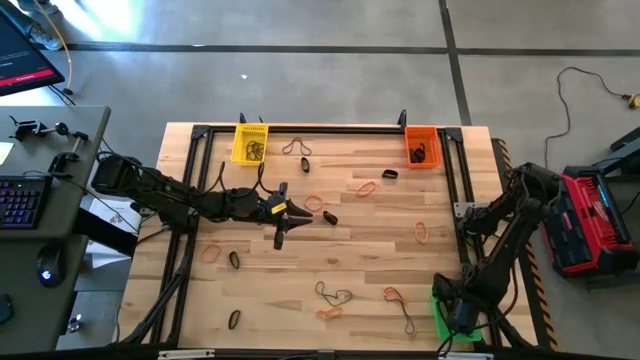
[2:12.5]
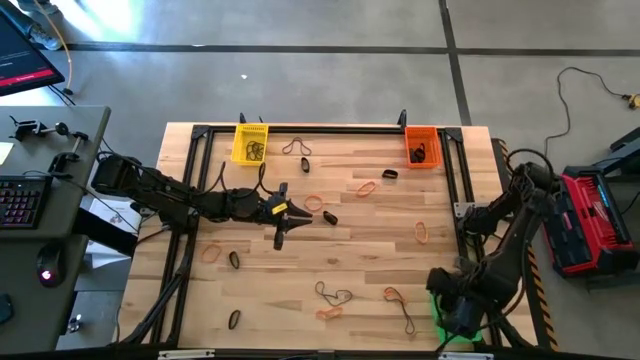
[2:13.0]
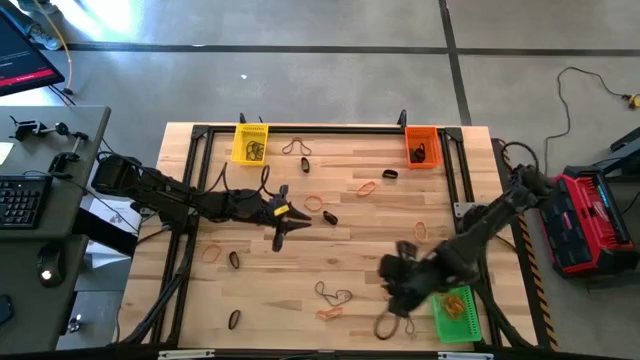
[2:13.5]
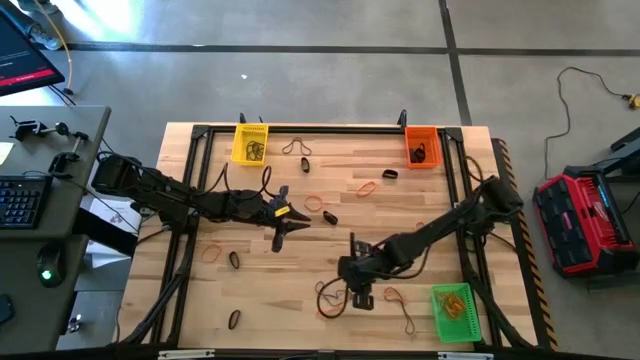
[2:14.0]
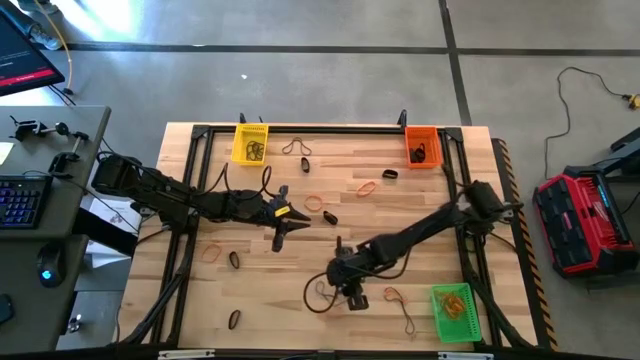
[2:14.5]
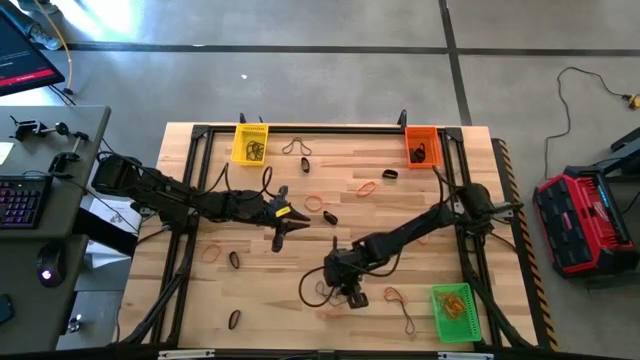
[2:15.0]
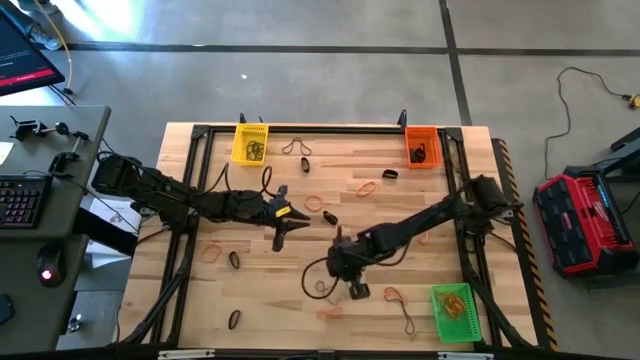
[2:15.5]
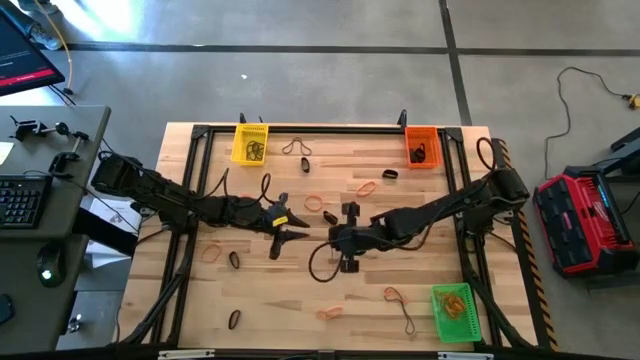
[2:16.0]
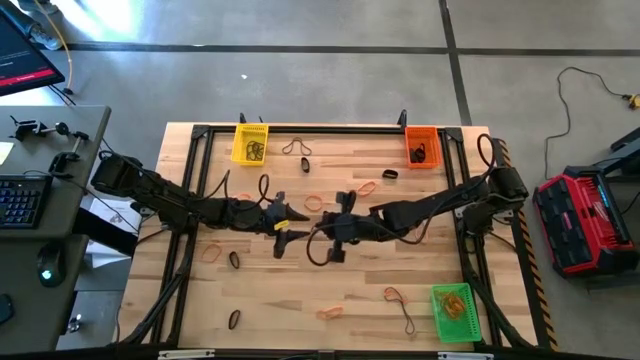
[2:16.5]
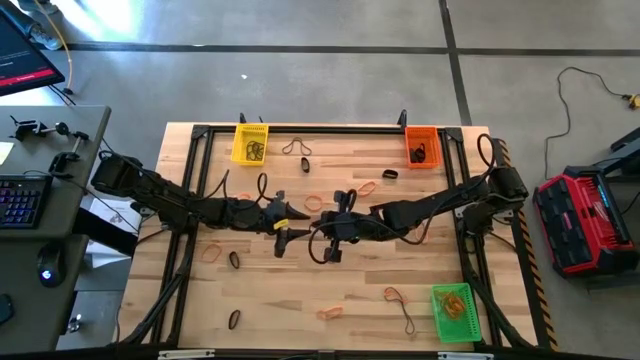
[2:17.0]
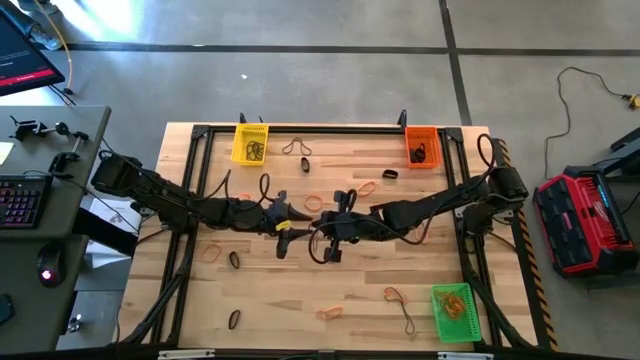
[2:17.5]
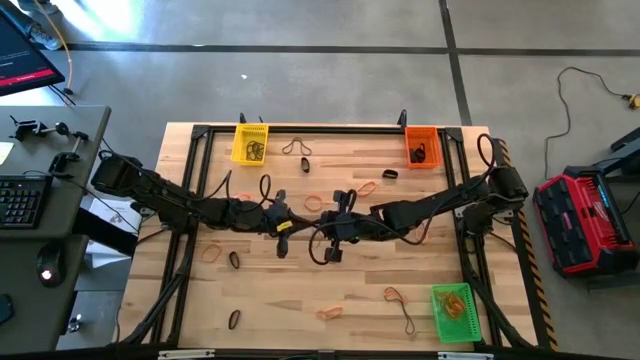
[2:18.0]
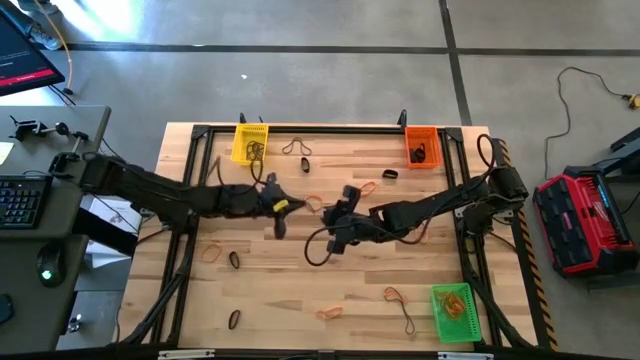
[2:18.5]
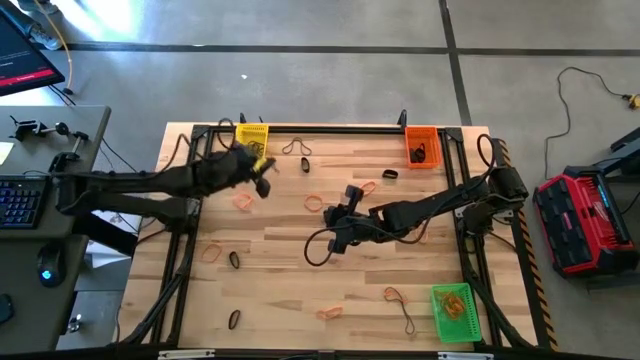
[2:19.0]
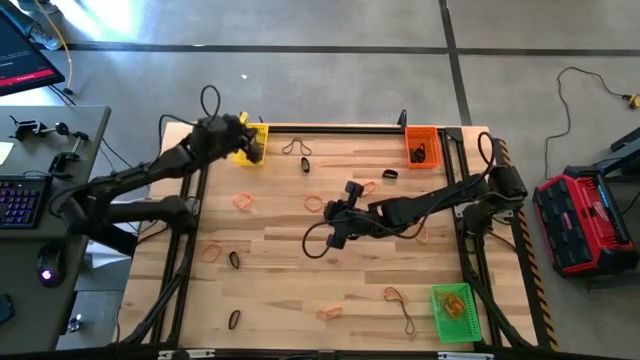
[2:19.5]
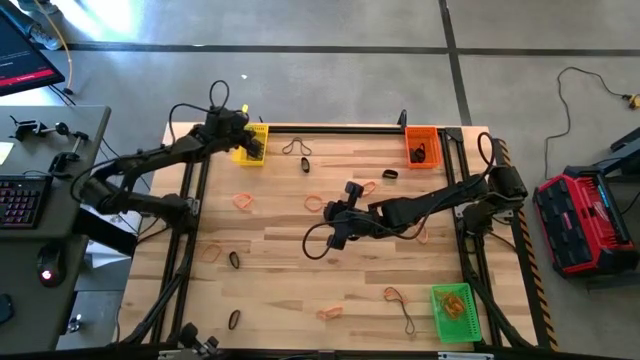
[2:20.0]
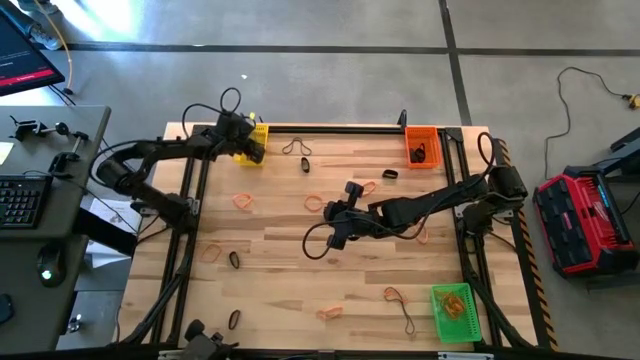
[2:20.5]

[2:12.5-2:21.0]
Task: Sort rubber bands into baskets
Put the purple rubber band into the yellow bin

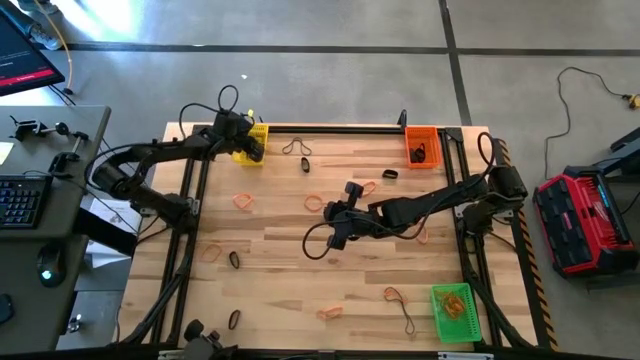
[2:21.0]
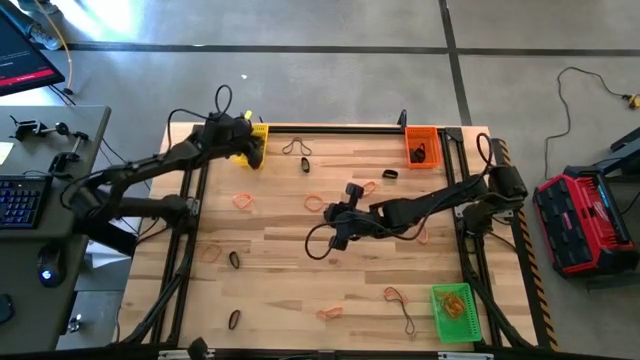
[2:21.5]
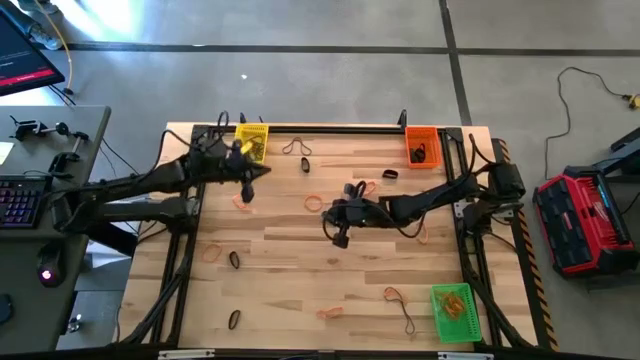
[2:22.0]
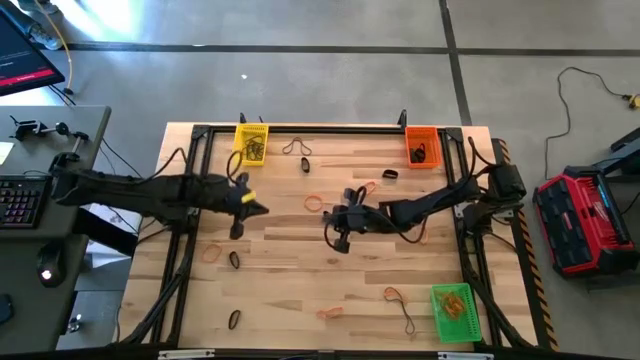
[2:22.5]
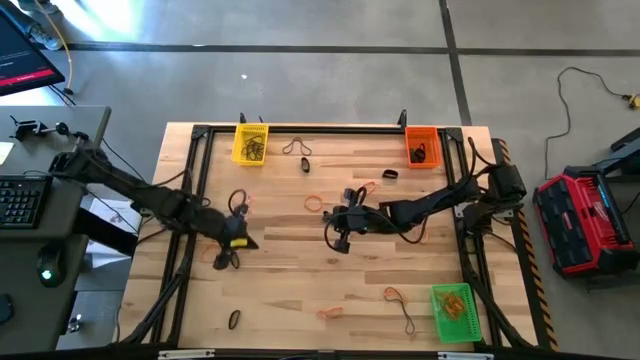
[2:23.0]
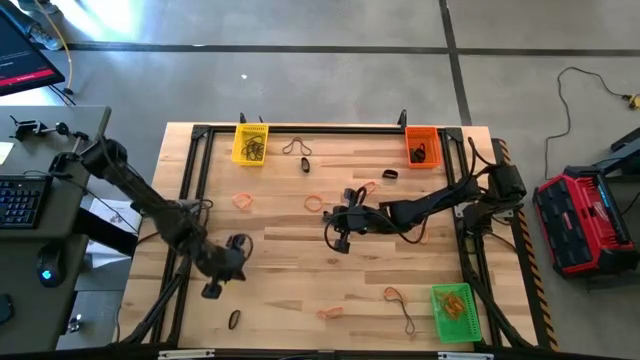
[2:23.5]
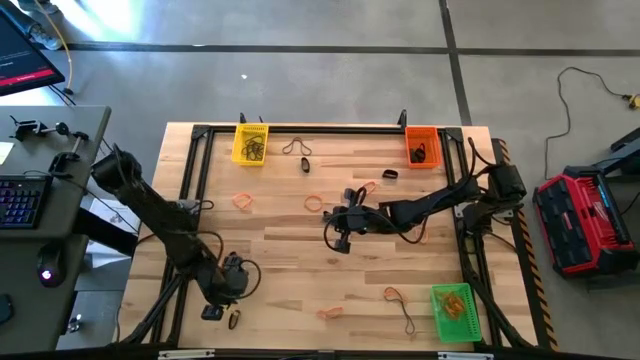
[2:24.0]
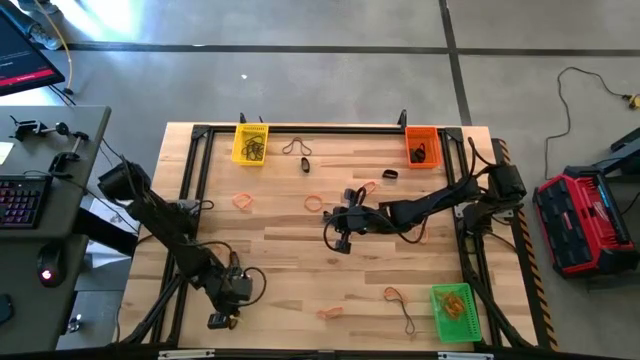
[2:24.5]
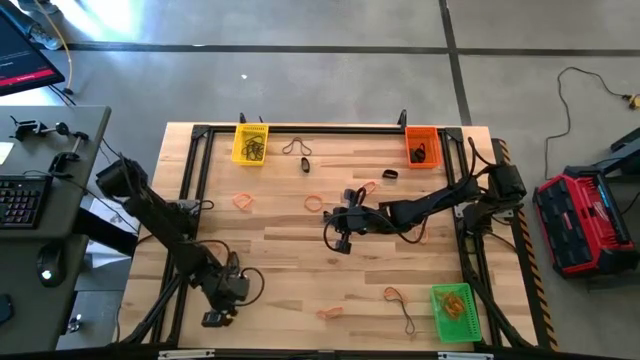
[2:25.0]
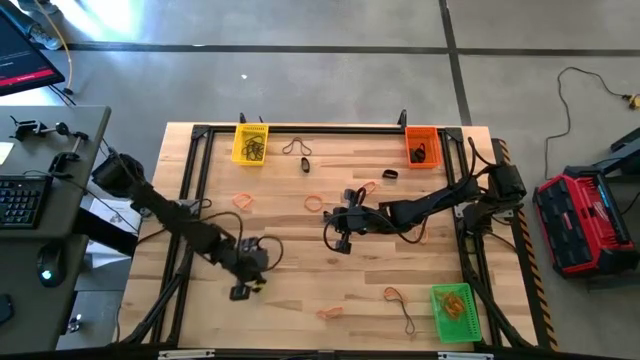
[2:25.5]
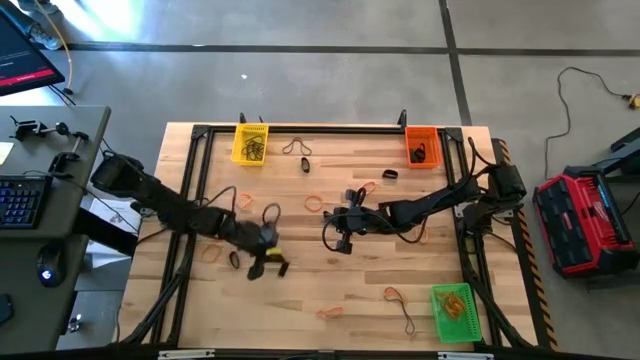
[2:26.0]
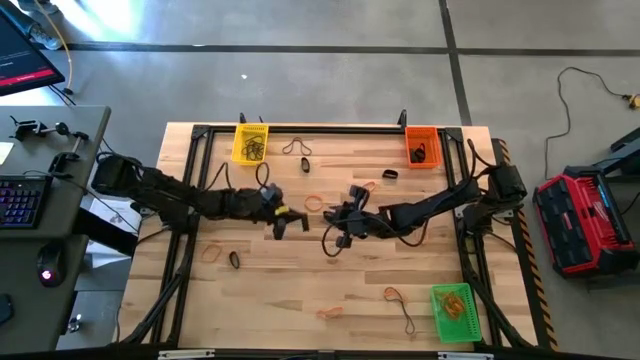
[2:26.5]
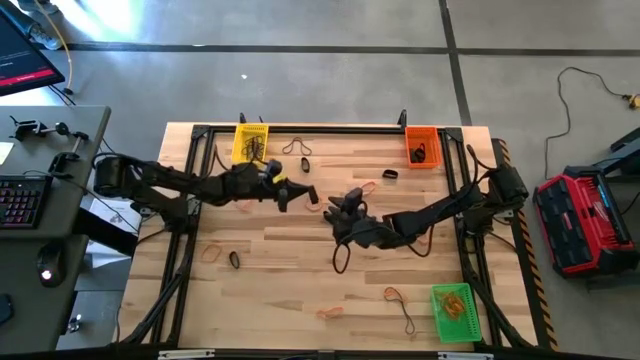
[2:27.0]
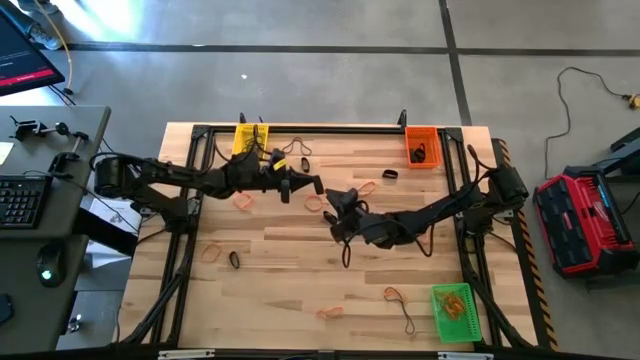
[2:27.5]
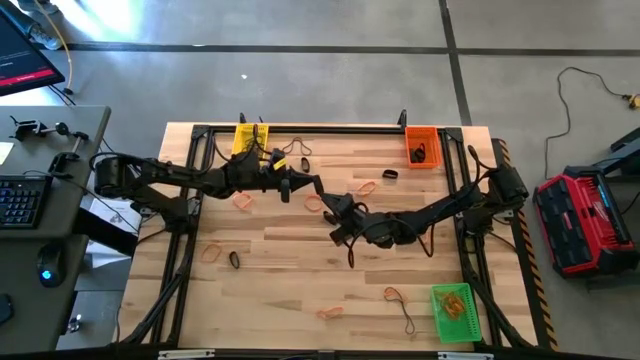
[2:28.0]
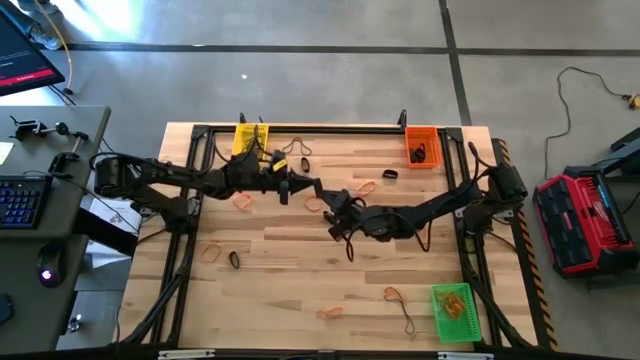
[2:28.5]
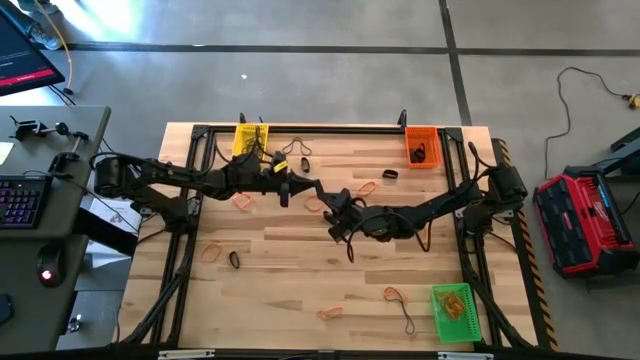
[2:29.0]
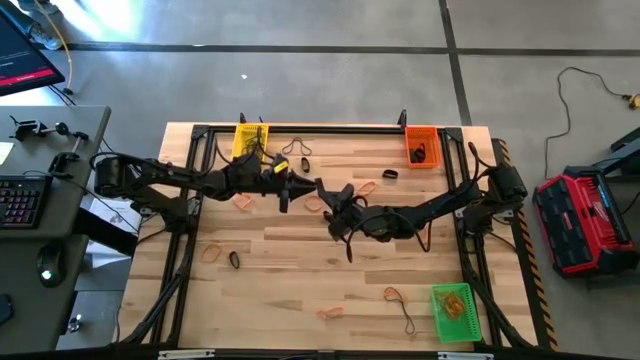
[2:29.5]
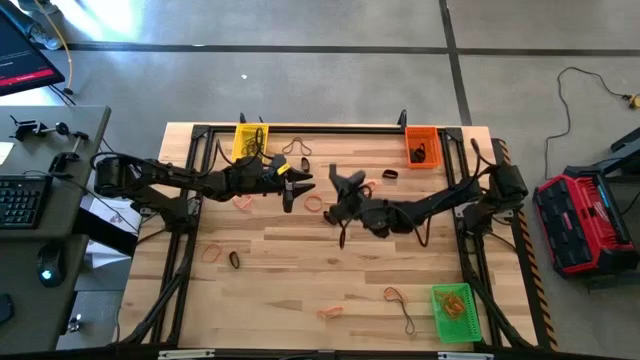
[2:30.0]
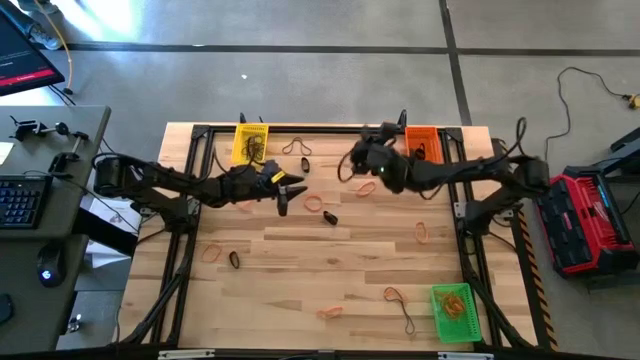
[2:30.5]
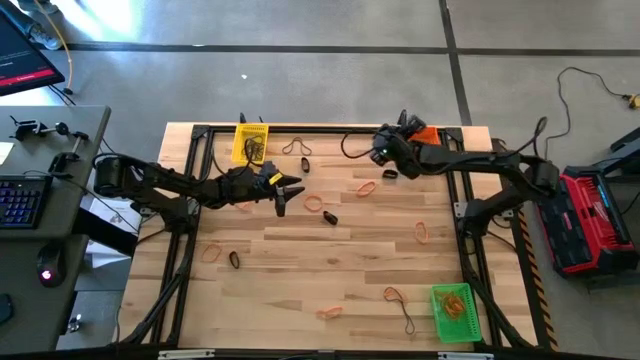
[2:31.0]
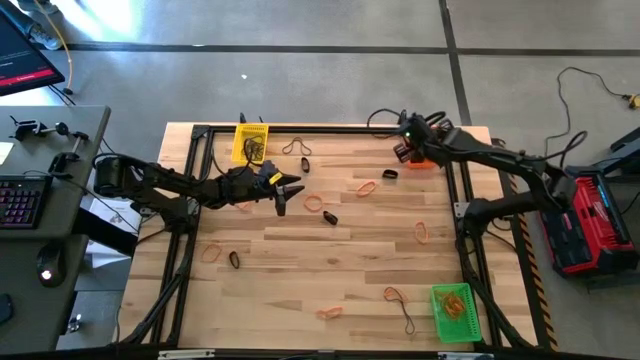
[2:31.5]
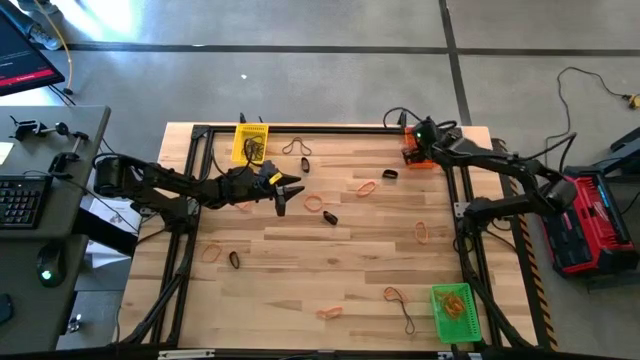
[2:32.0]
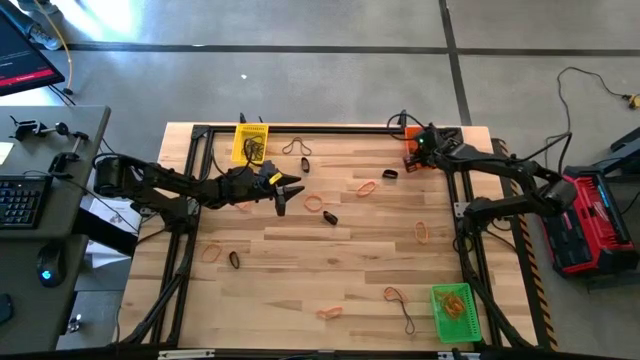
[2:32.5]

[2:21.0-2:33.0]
Put the black rubber band into the orange bin
